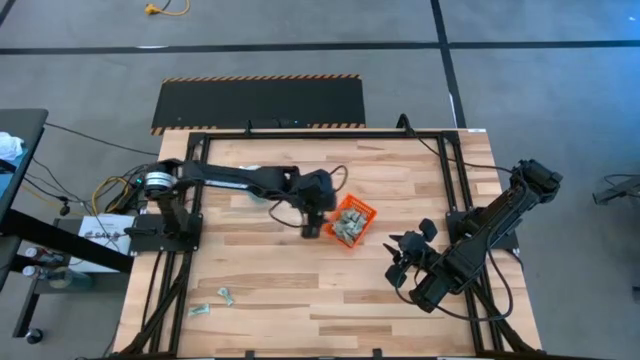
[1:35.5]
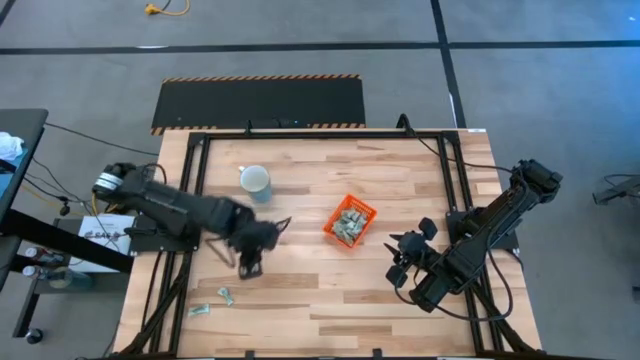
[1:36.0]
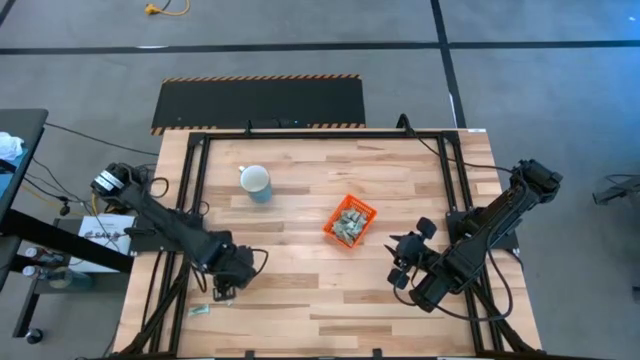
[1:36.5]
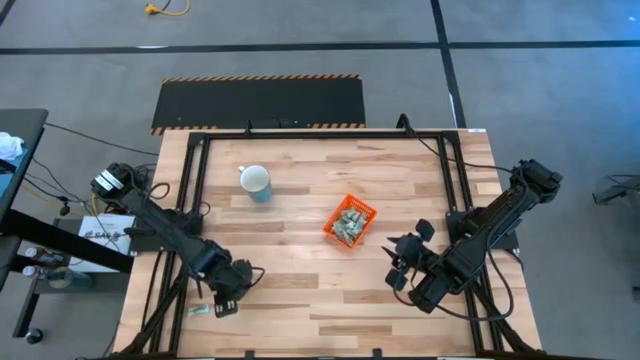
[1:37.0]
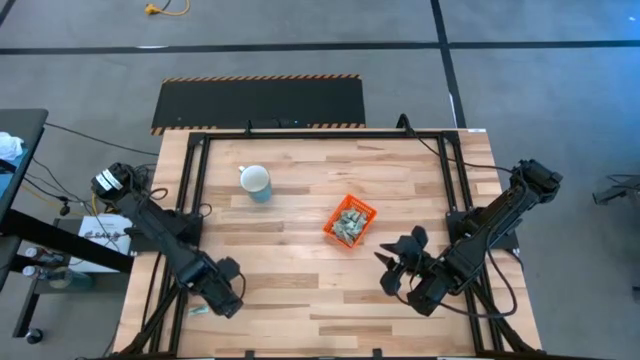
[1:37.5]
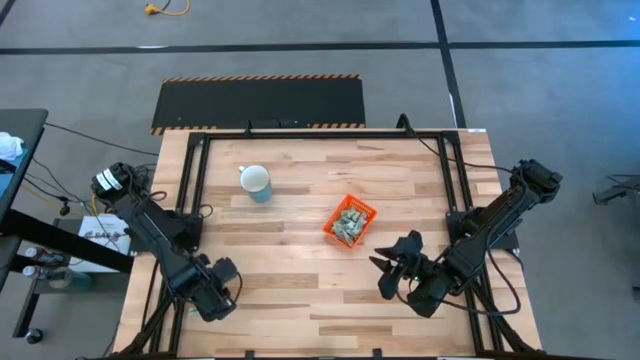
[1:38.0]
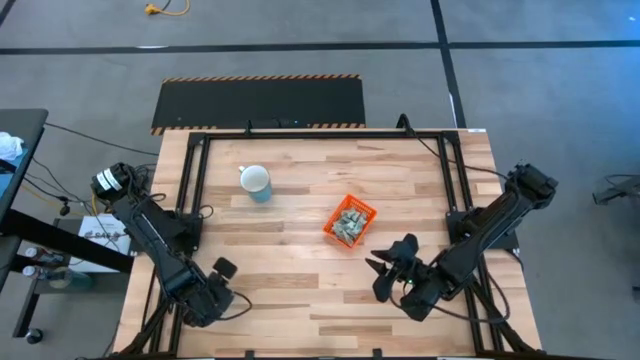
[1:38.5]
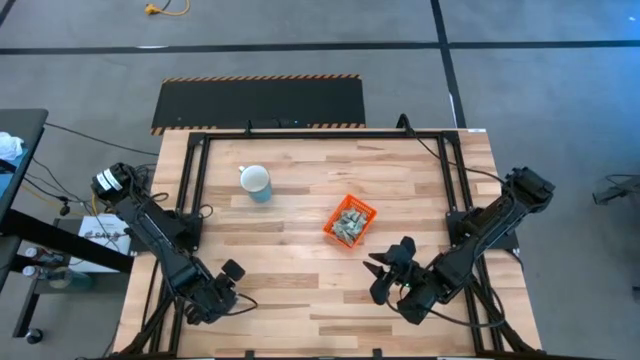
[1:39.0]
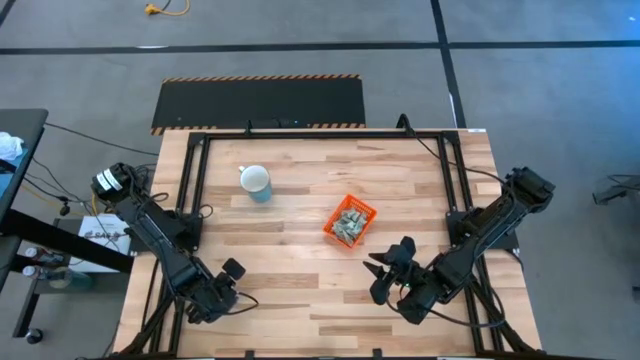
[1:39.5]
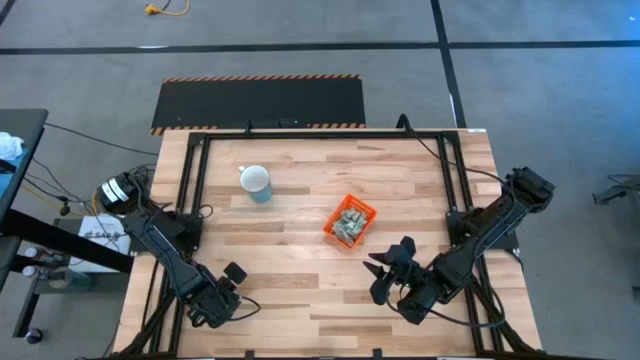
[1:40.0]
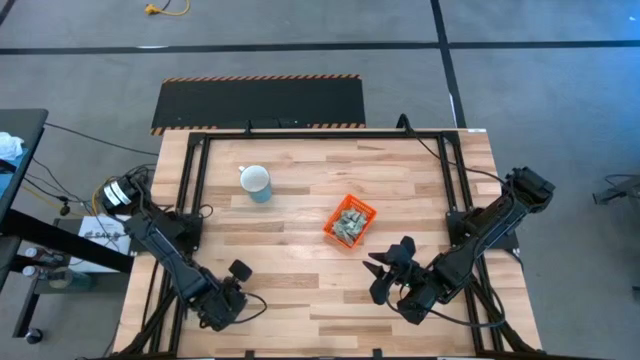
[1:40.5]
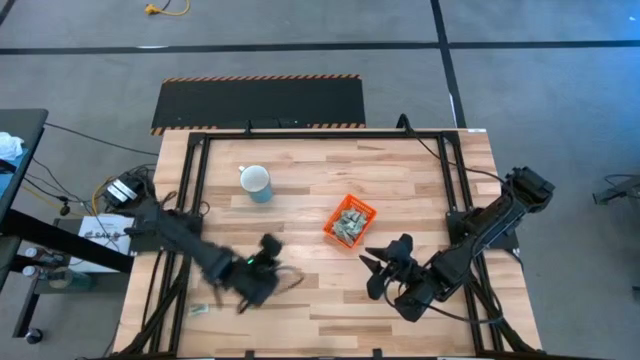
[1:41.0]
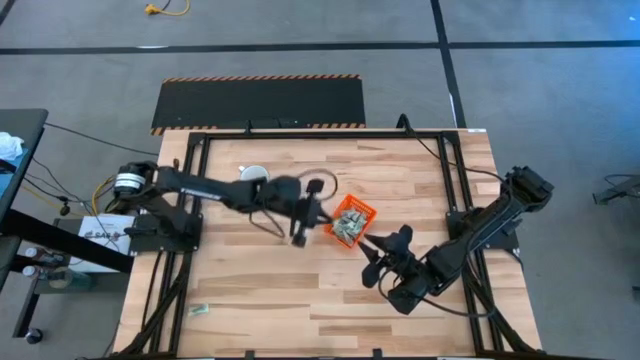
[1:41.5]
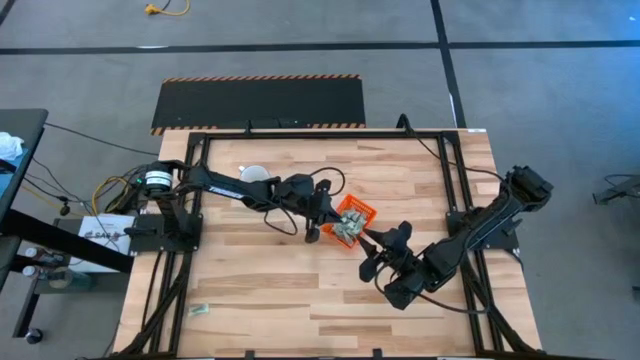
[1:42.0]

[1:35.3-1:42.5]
Task: Pick and place Stevia / Truvia into bins
Put the stevia packet into the basket

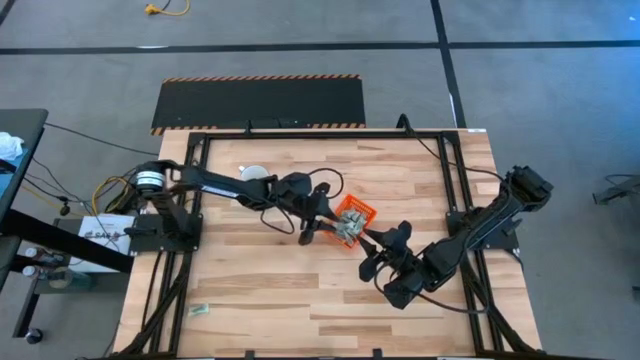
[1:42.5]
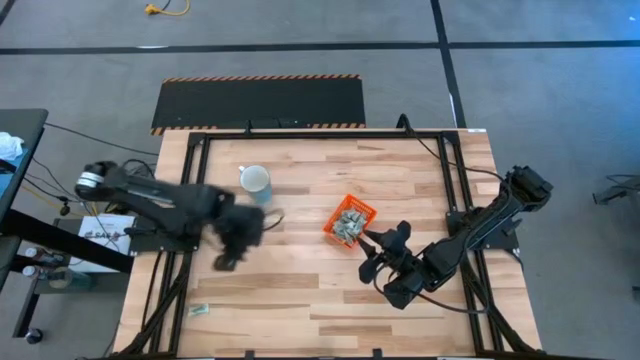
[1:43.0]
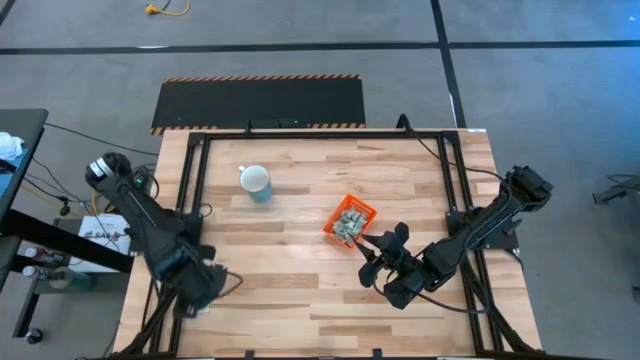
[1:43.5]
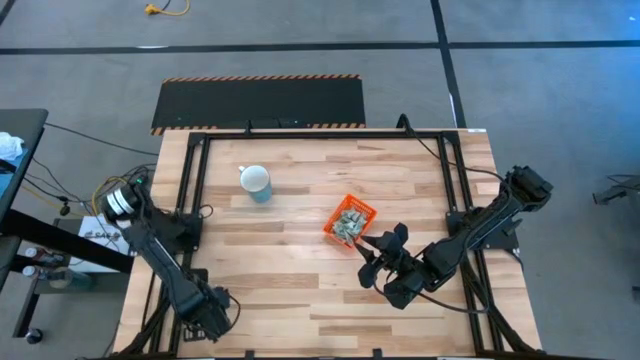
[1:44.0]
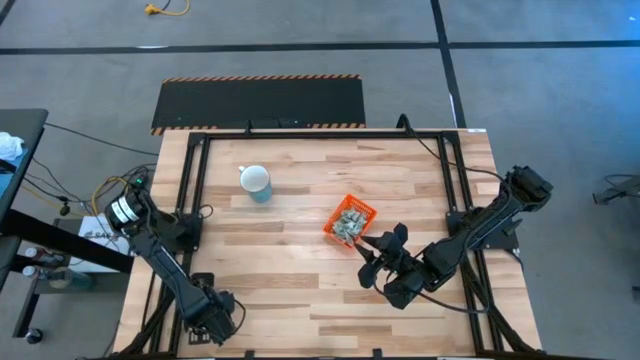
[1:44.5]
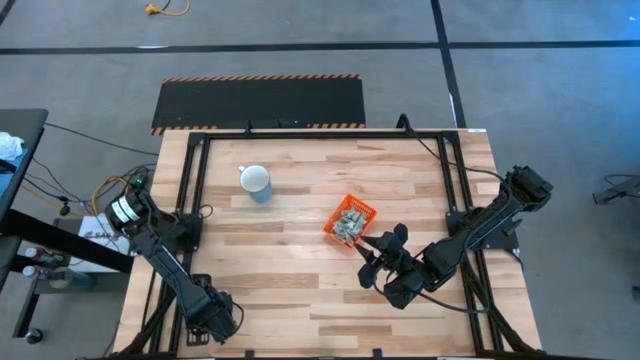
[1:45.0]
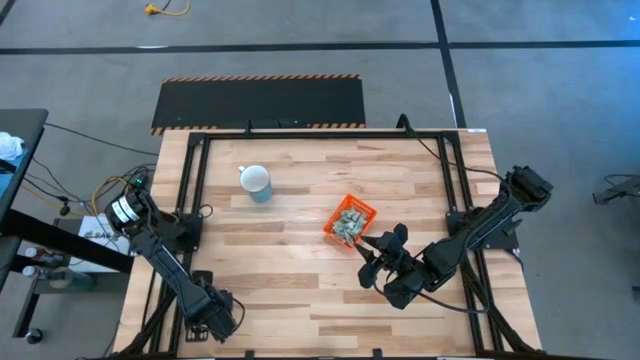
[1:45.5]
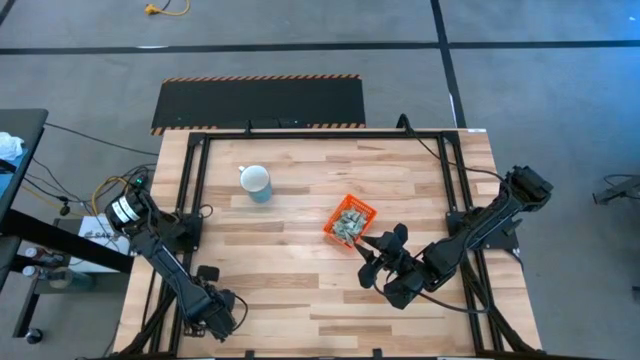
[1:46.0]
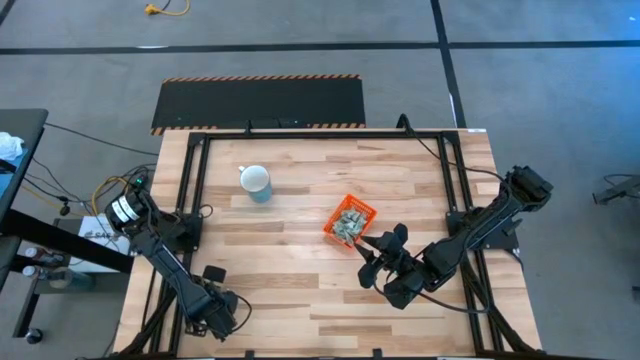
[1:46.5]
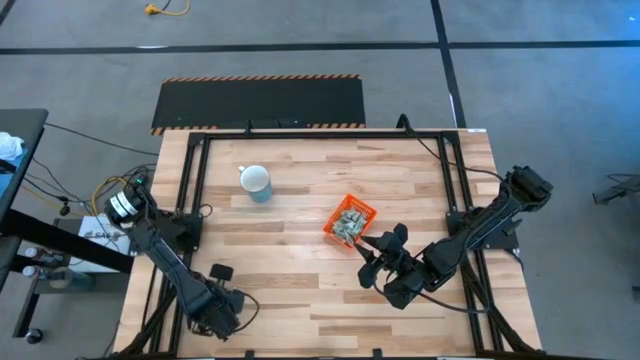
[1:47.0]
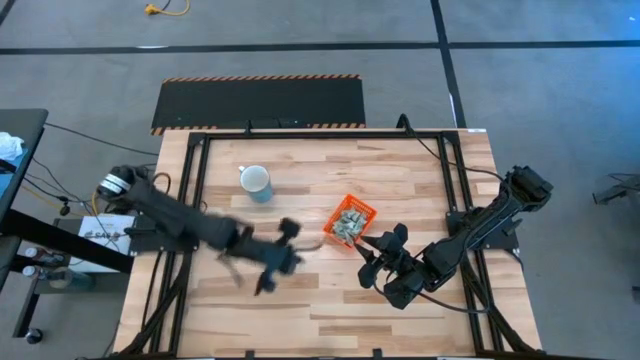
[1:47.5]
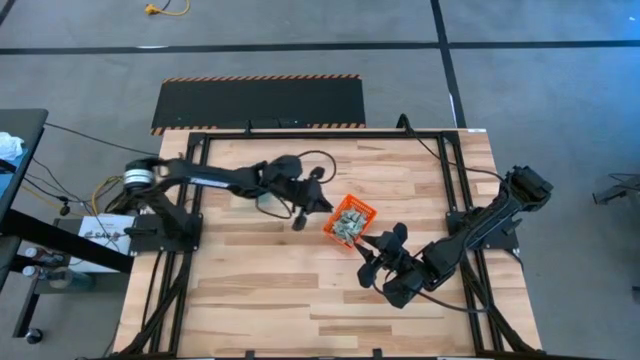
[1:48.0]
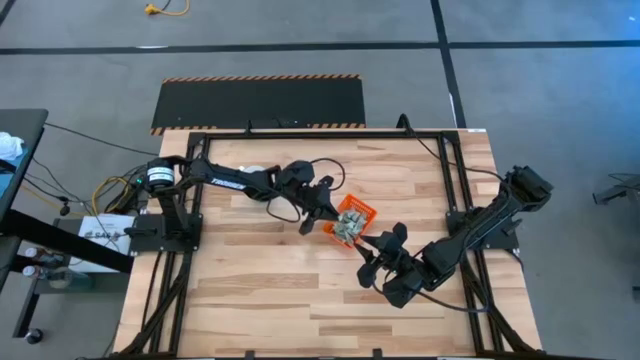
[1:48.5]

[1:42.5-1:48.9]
Put the stevia packet into the basket

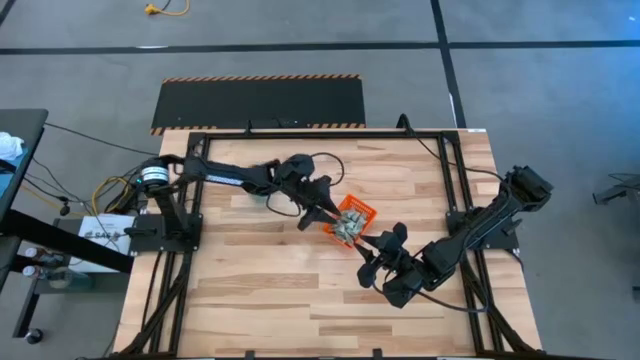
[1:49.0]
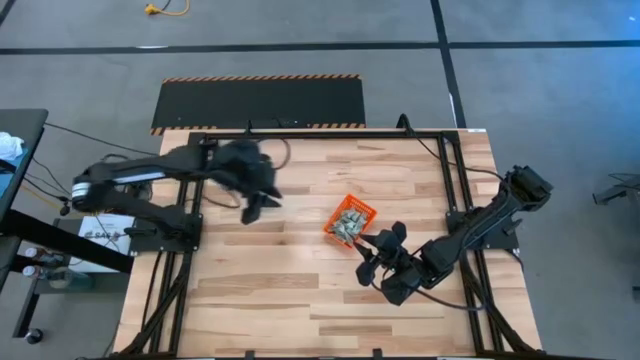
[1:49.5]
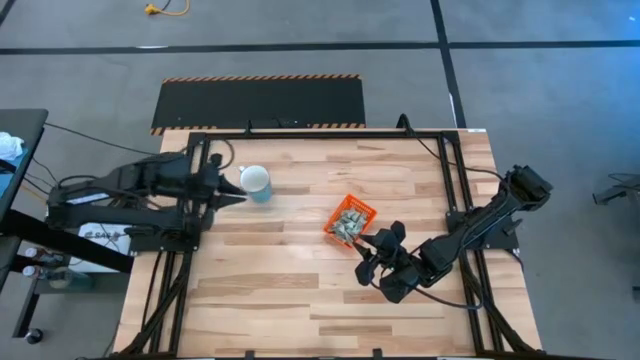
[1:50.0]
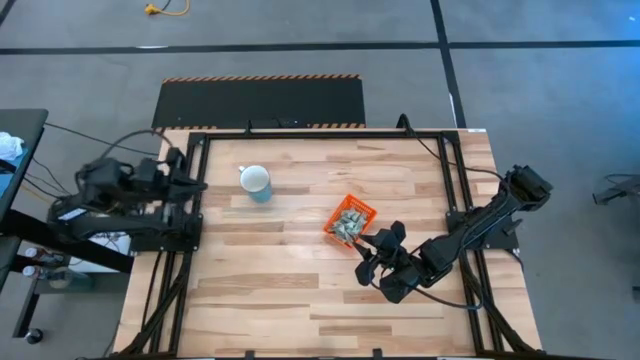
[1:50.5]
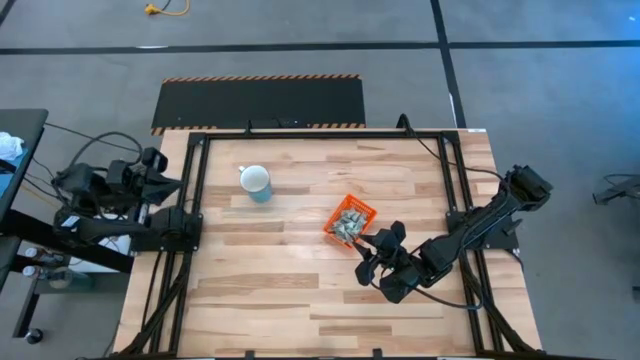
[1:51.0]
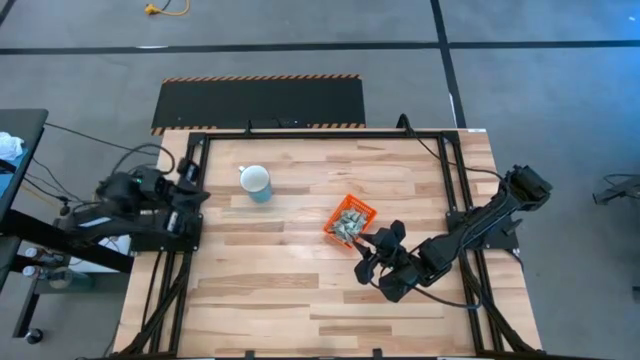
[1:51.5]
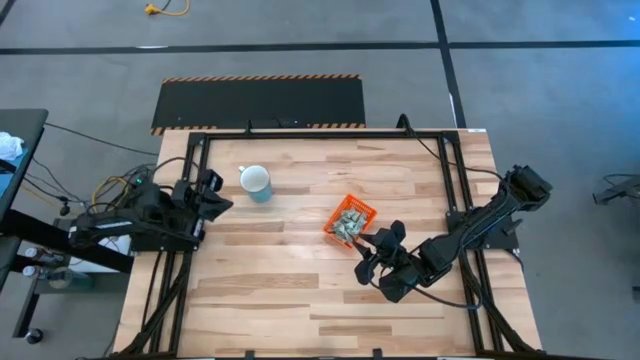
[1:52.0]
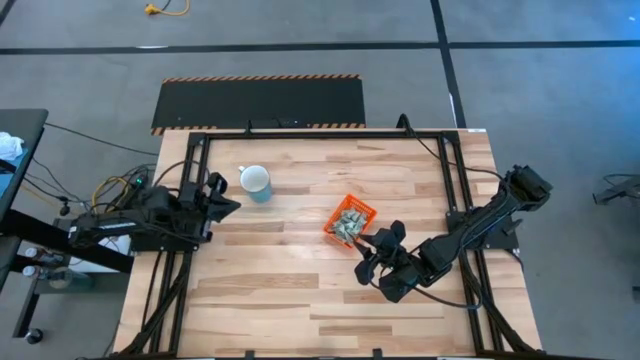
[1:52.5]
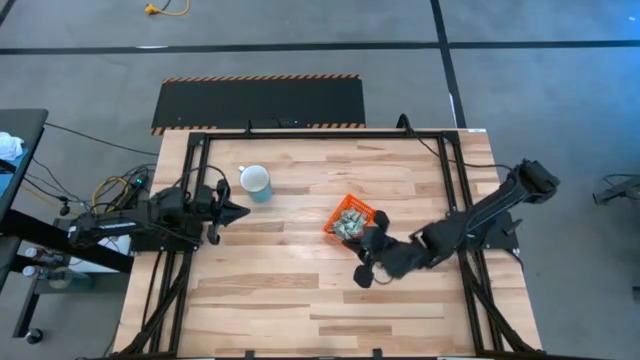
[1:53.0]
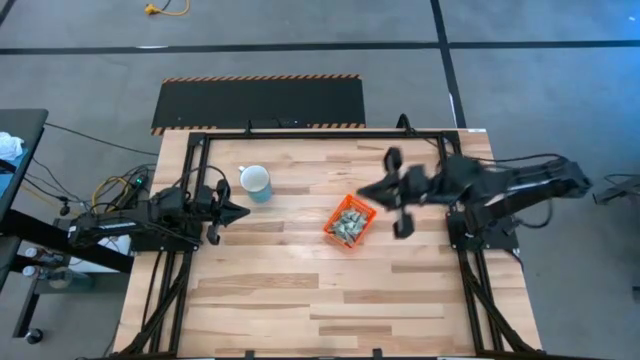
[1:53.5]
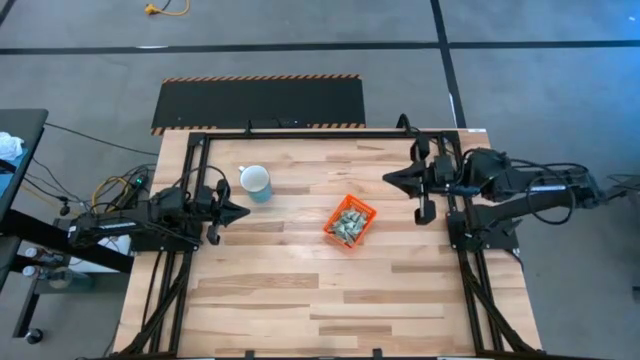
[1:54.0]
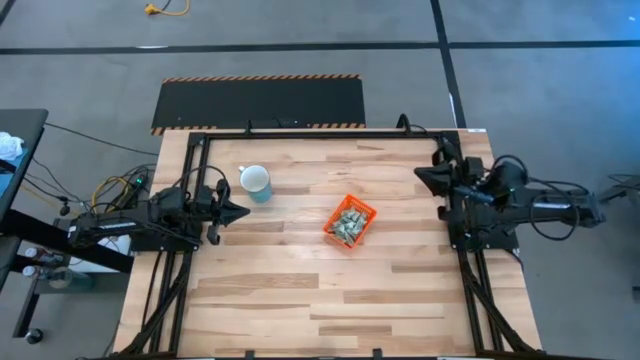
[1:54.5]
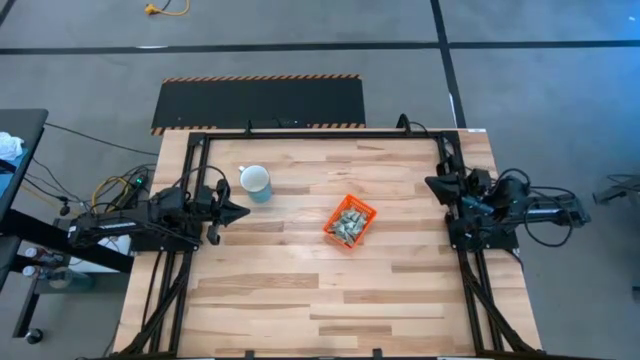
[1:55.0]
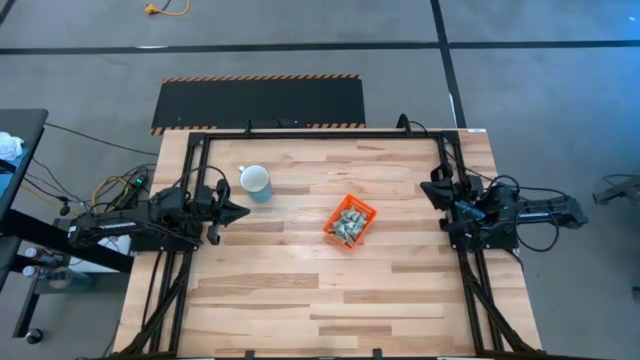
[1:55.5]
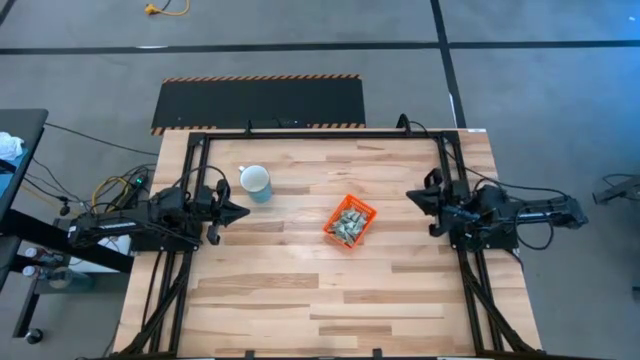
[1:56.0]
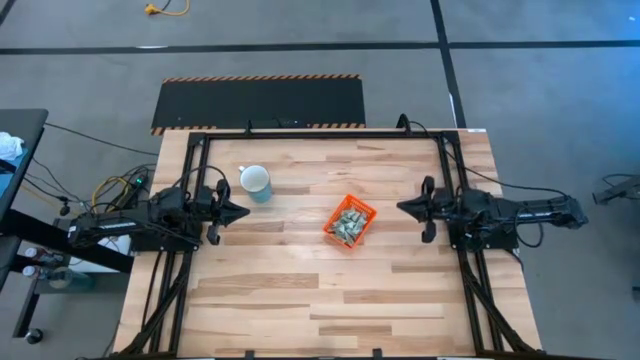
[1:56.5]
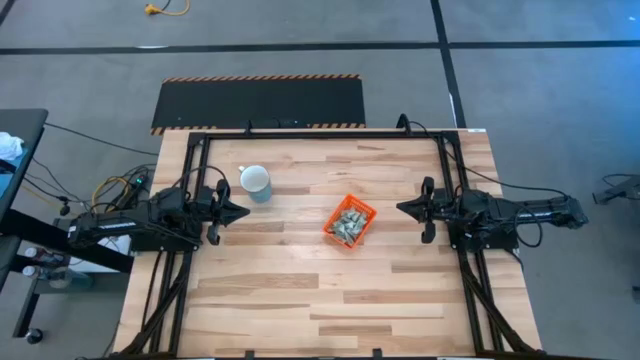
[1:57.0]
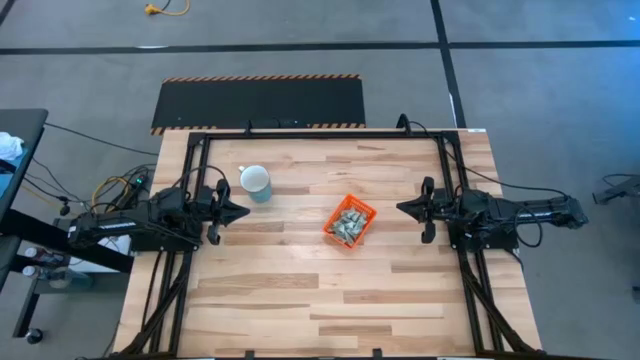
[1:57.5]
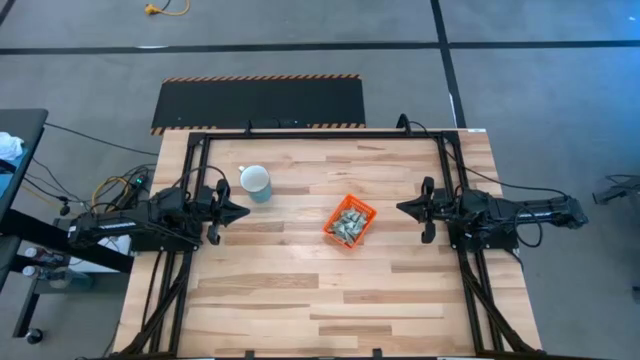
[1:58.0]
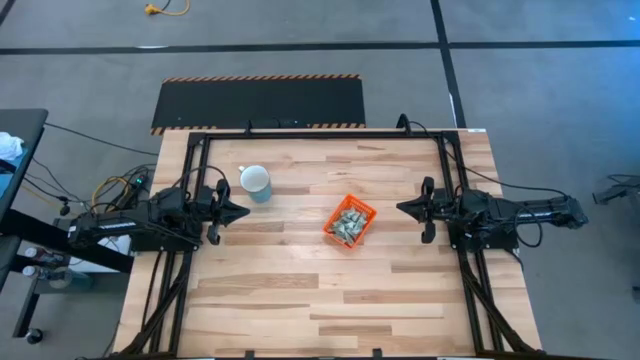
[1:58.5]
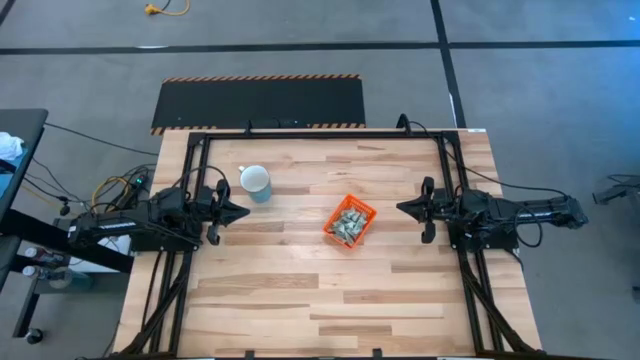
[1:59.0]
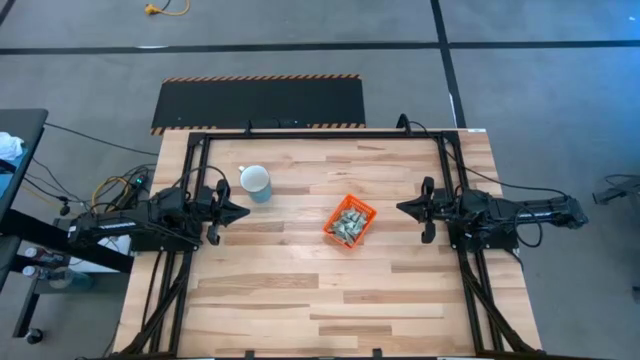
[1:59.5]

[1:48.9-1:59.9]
Return to Home Position
